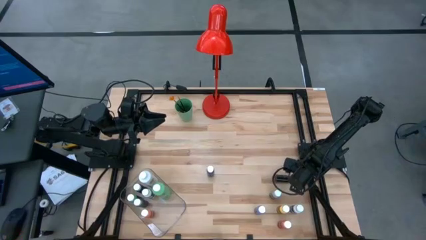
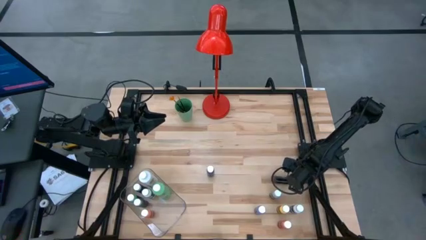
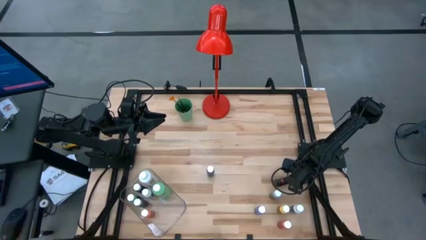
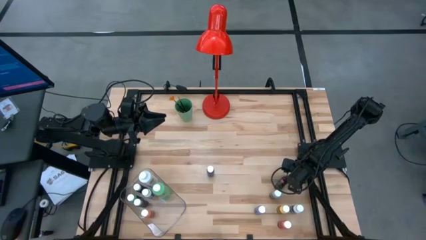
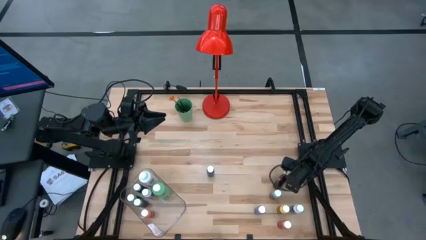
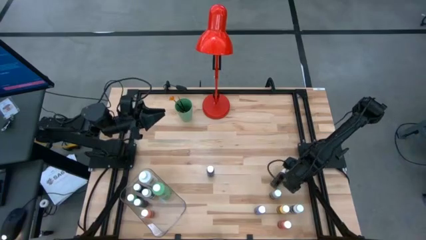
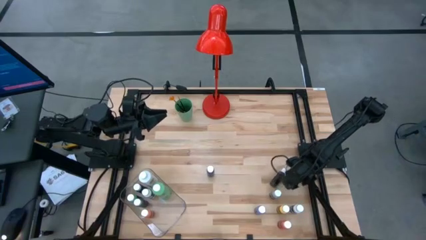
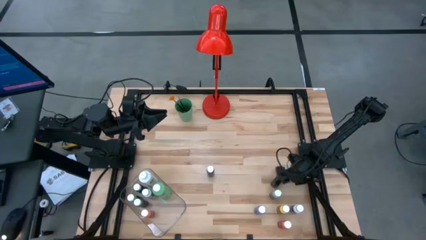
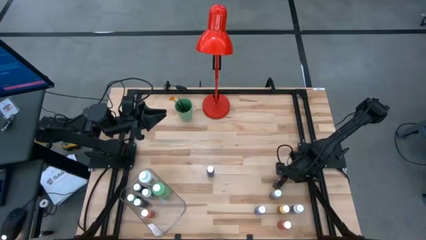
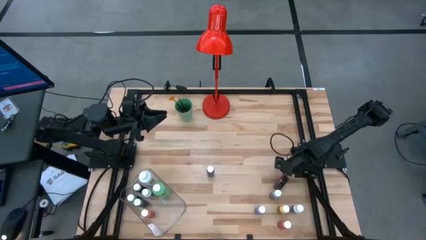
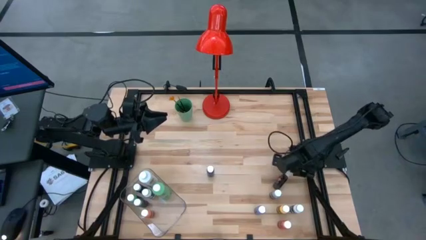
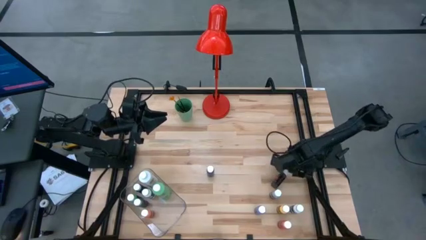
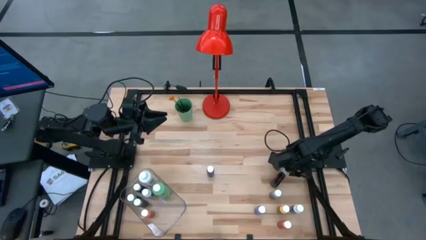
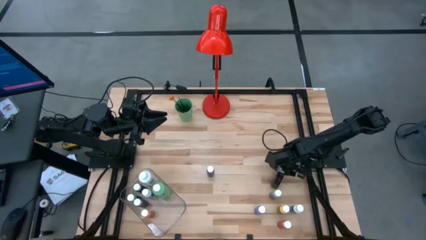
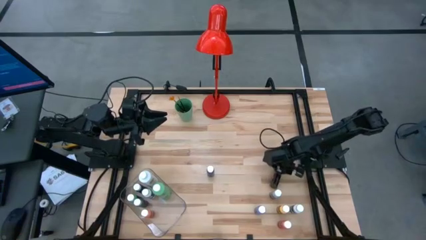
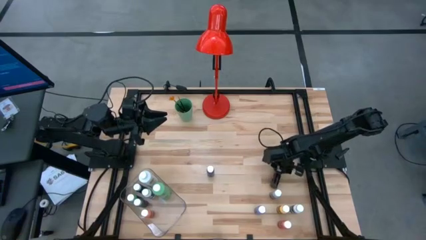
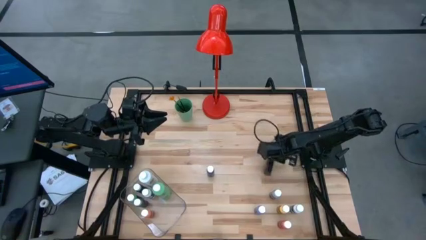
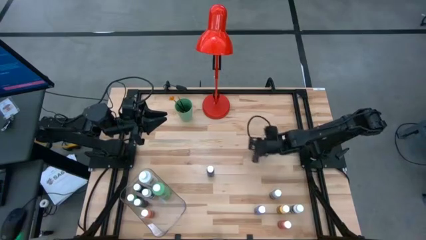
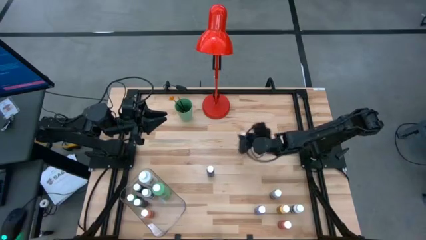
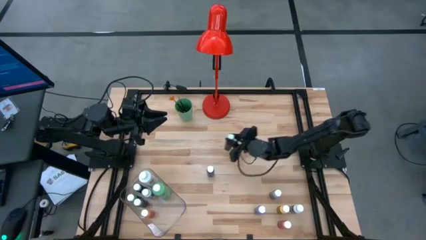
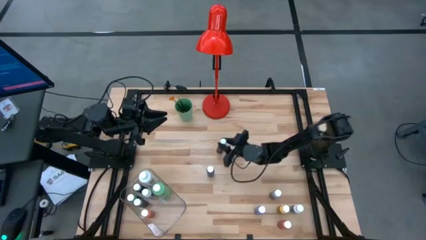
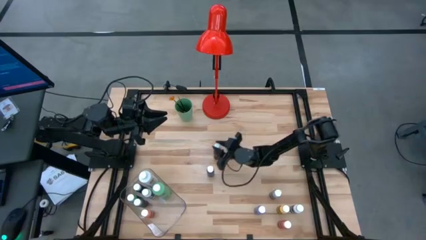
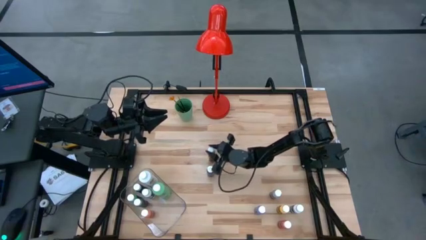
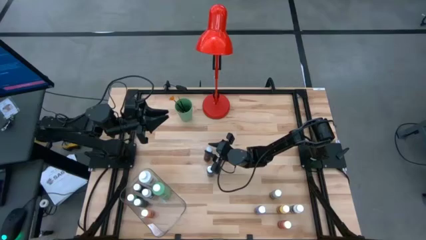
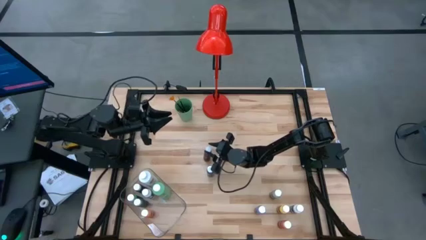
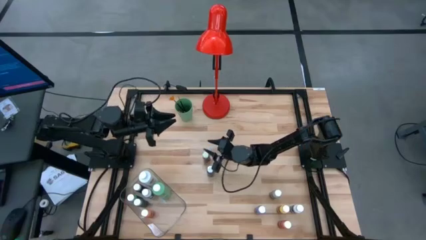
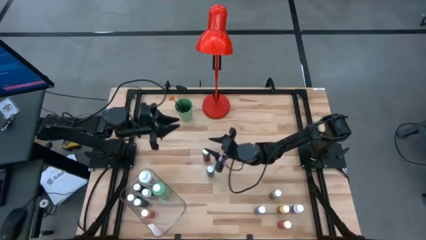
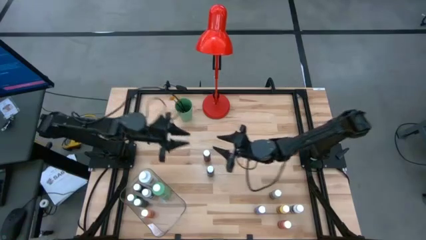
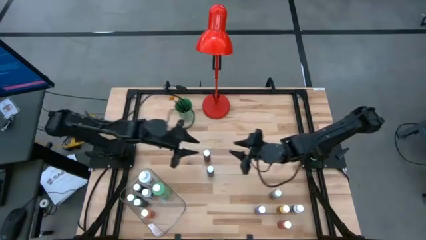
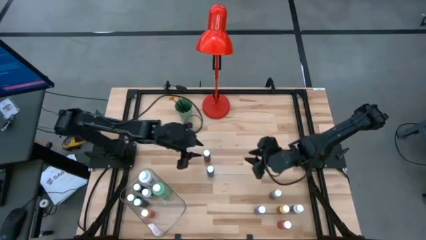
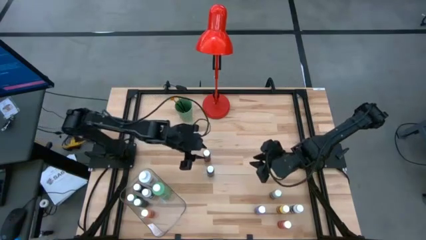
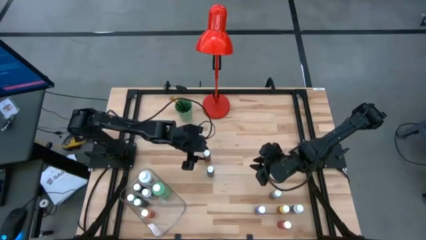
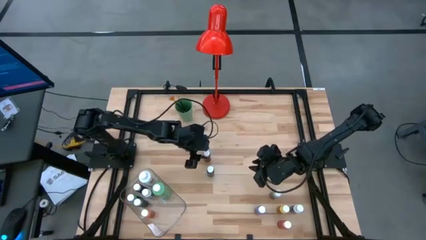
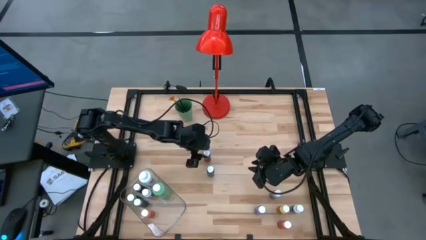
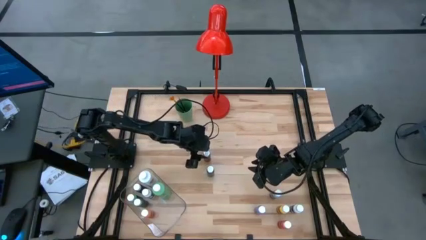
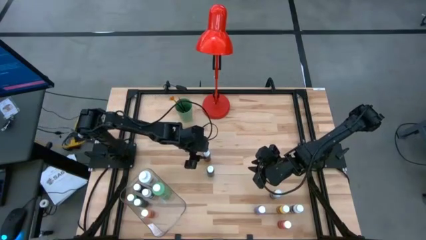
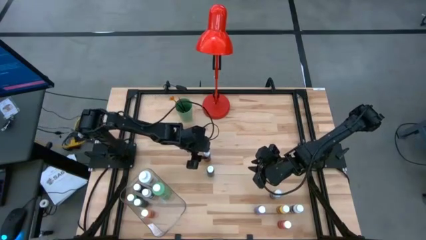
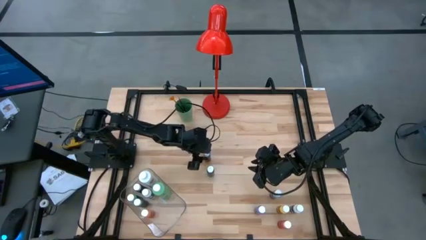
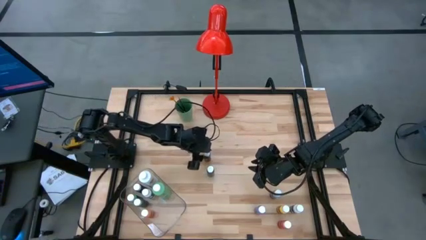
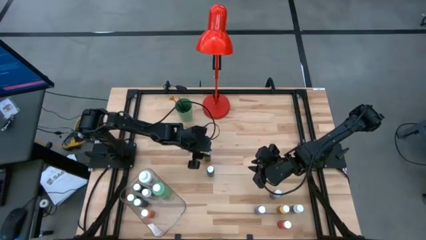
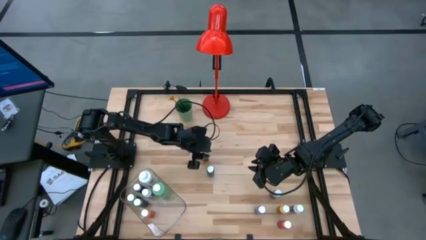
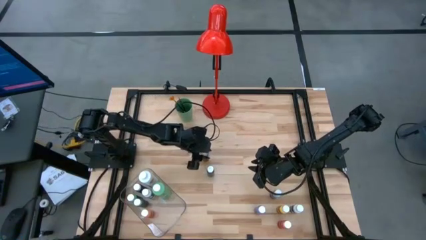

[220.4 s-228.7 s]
Task: Pick & Place Paint Supplies
Adjust the brown coloring bottle to the center of the table

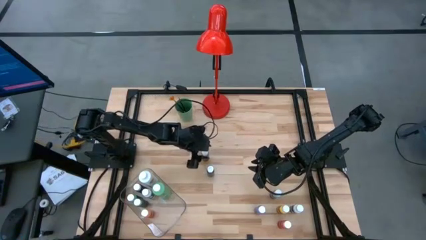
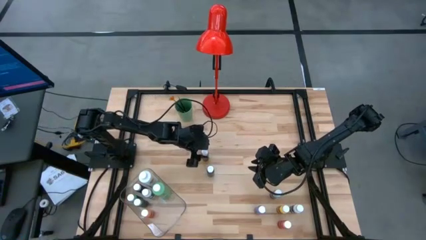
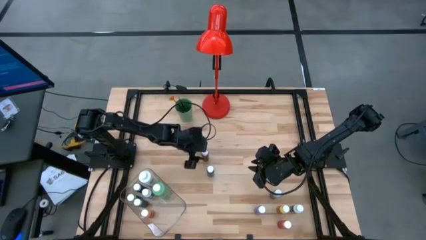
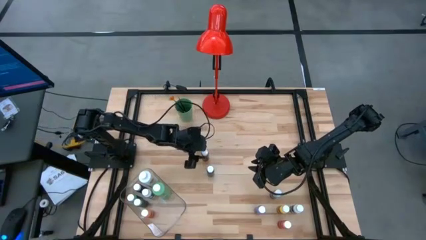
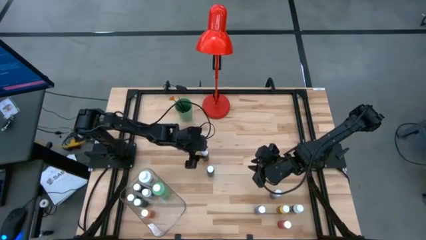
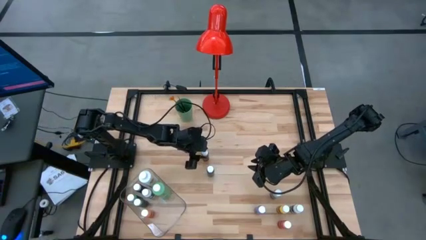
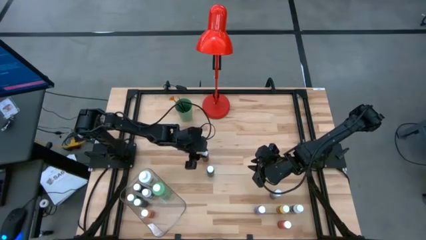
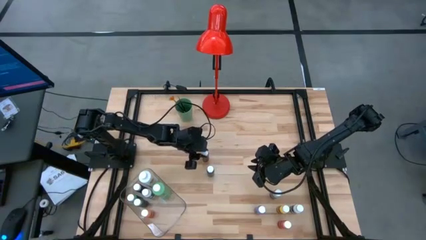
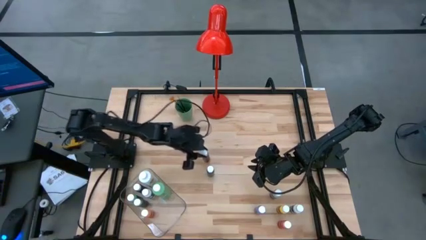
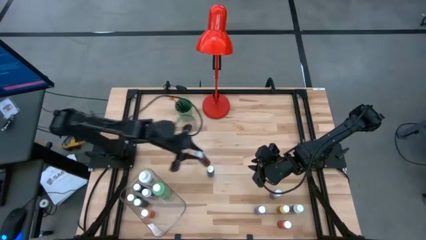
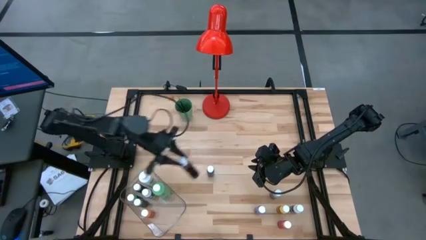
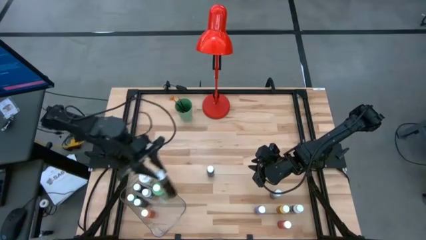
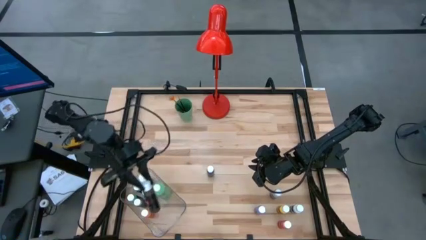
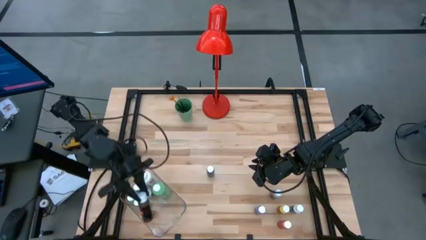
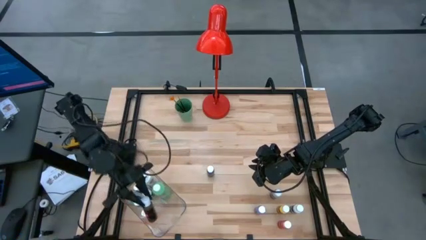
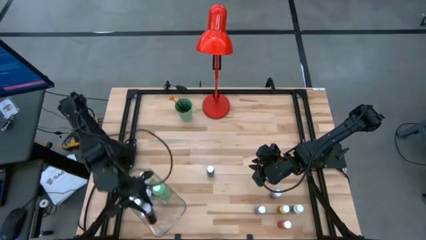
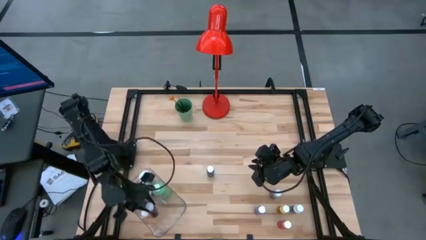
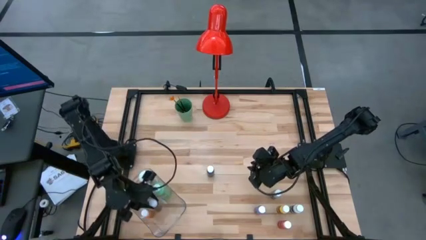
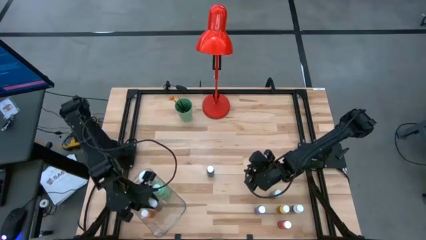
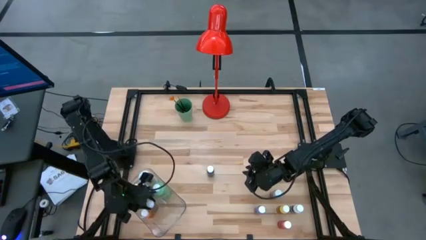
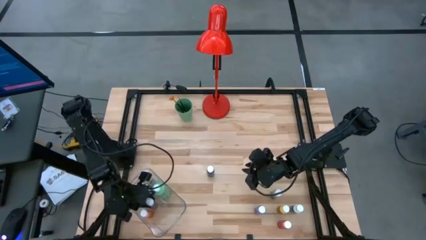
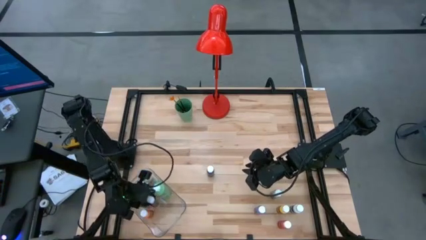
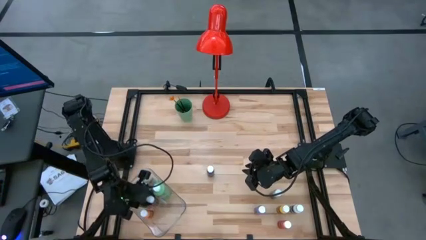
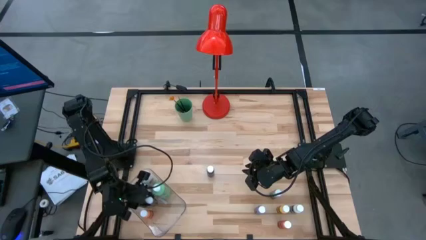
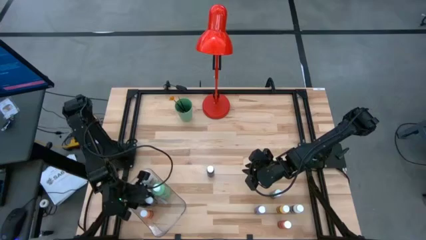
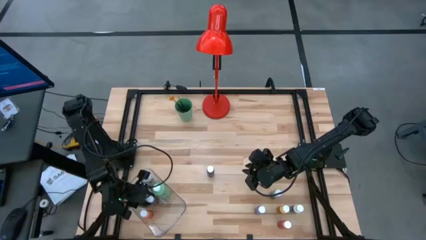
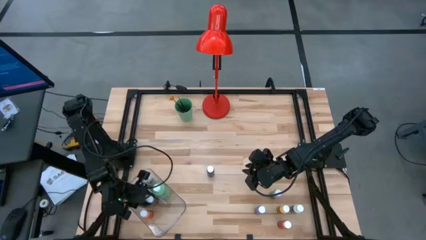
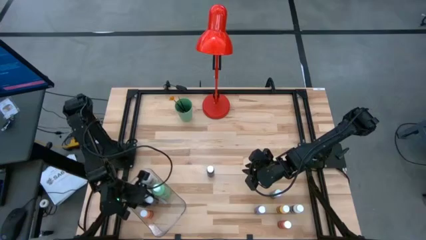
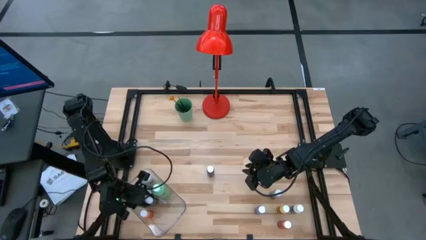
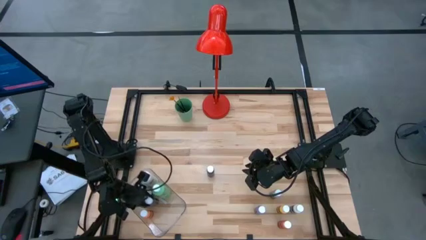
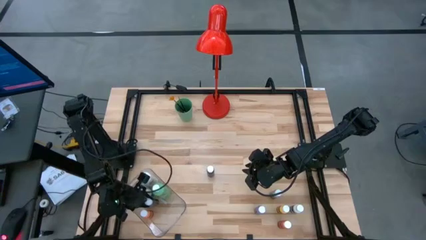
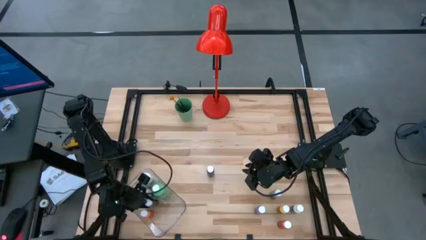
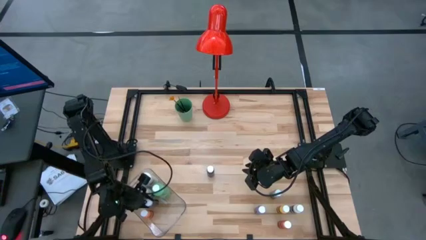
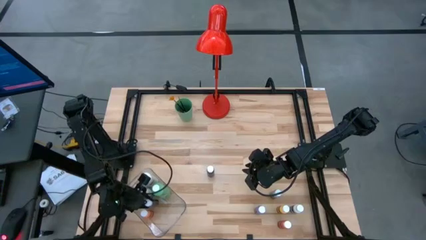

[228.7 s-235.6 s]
Put the brown coloring bottle into the transparent bin
